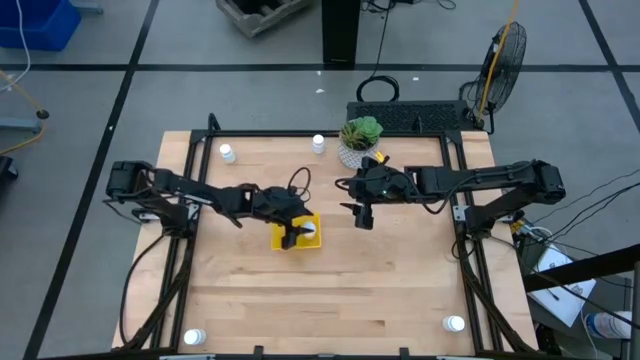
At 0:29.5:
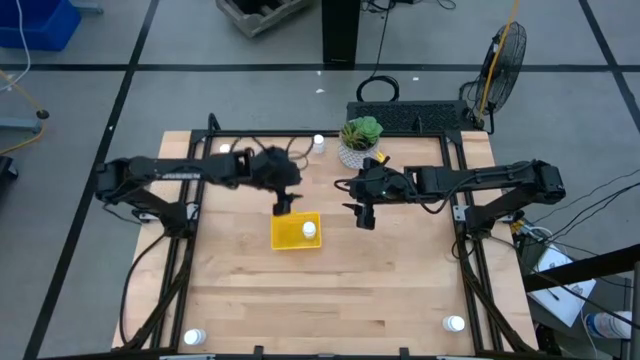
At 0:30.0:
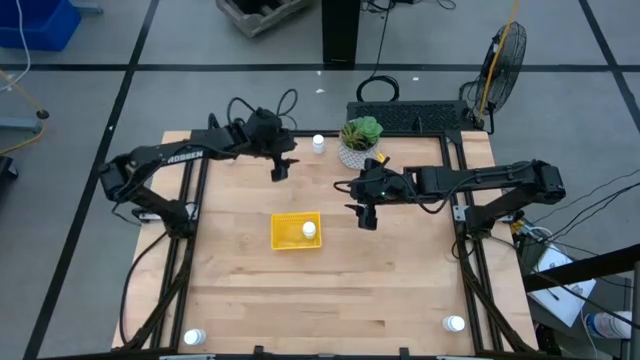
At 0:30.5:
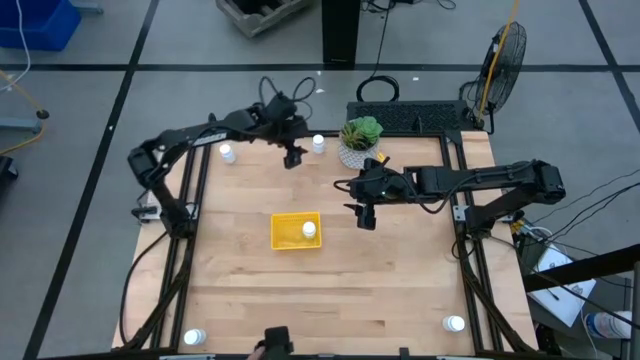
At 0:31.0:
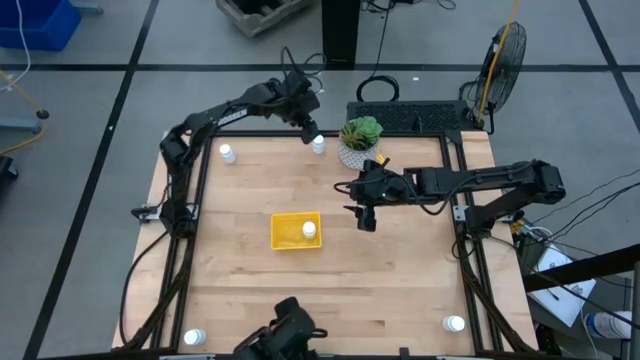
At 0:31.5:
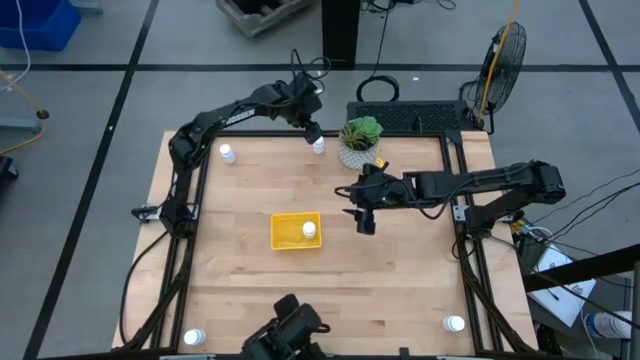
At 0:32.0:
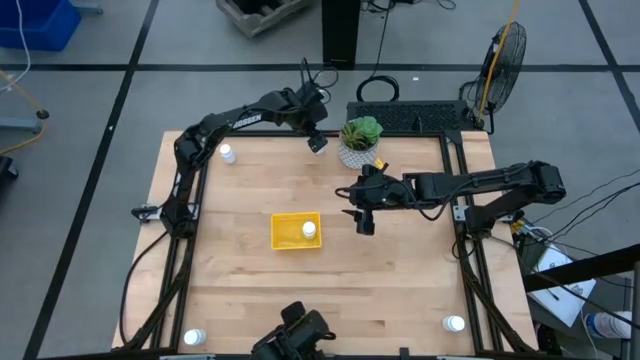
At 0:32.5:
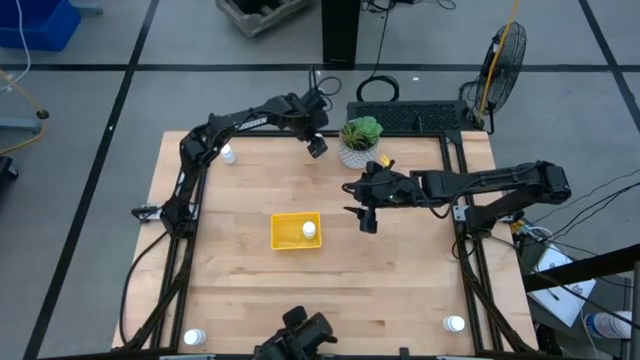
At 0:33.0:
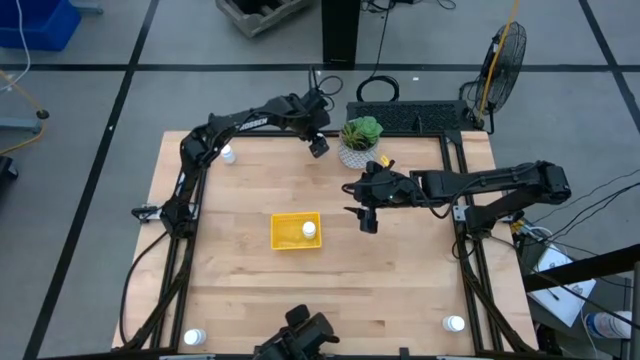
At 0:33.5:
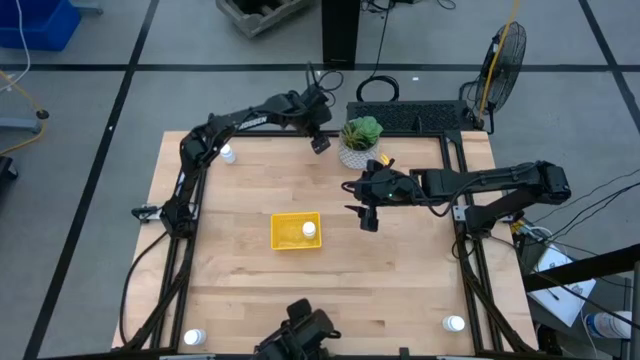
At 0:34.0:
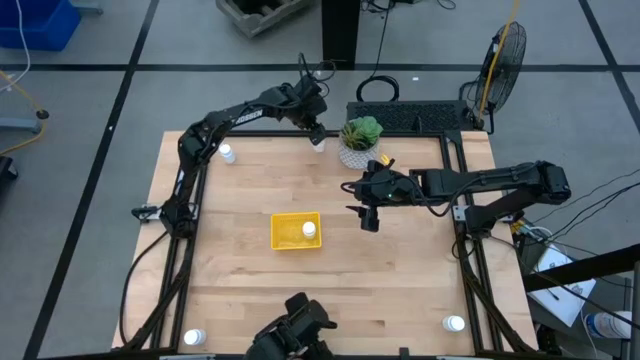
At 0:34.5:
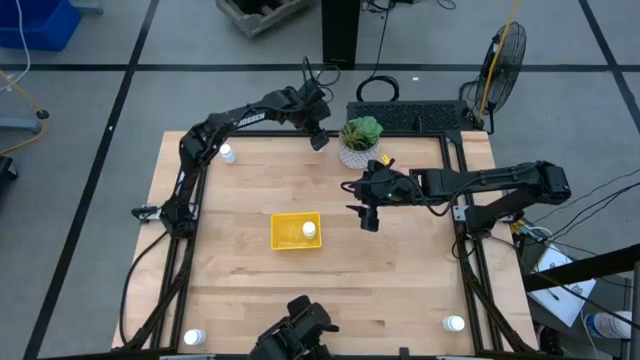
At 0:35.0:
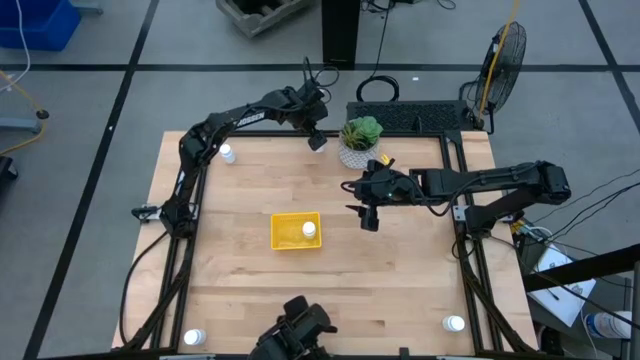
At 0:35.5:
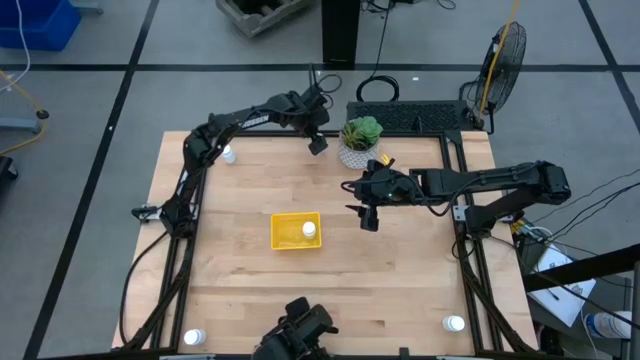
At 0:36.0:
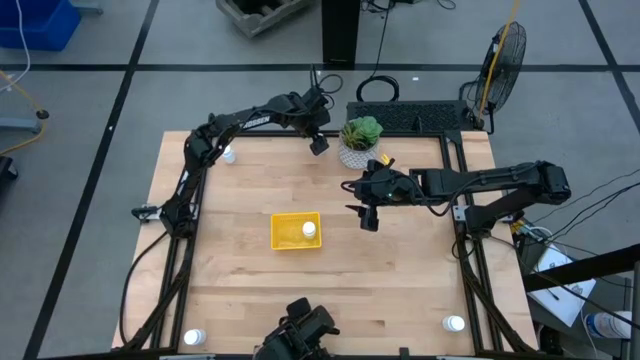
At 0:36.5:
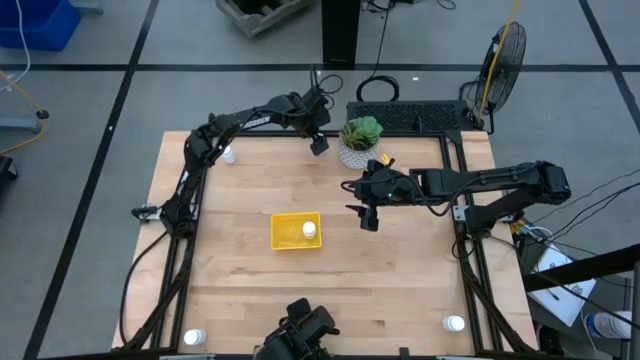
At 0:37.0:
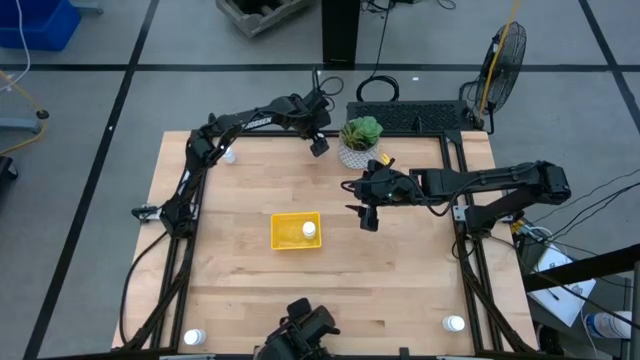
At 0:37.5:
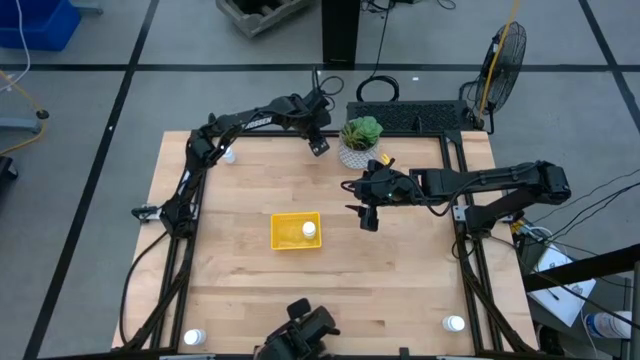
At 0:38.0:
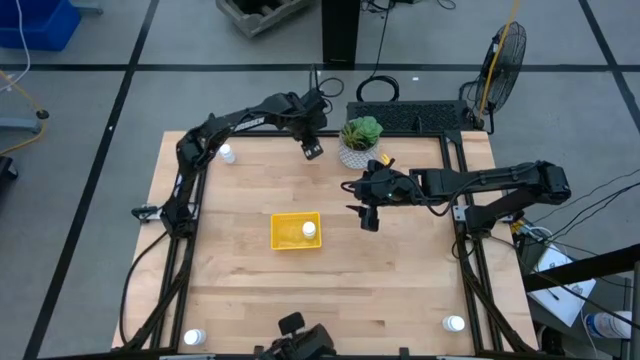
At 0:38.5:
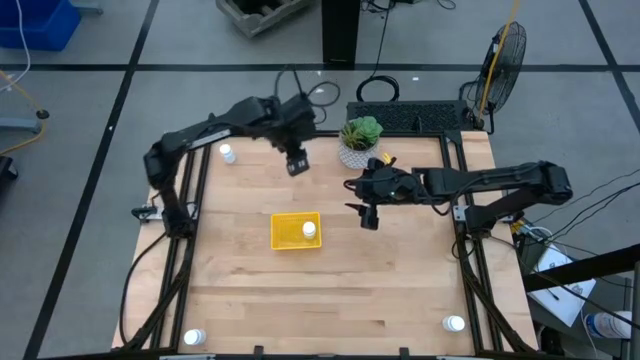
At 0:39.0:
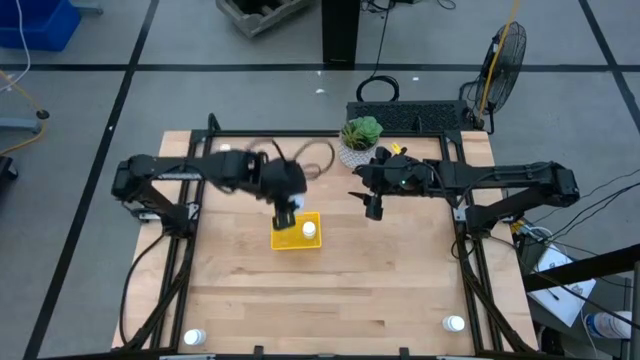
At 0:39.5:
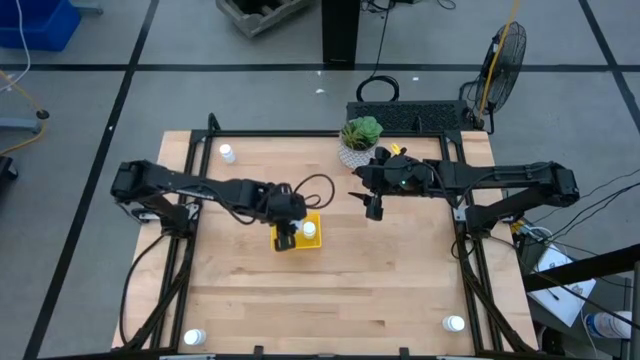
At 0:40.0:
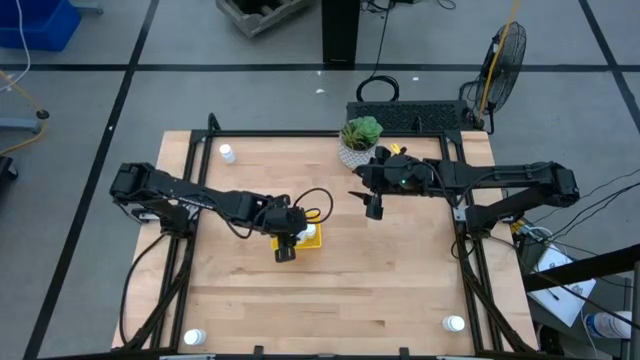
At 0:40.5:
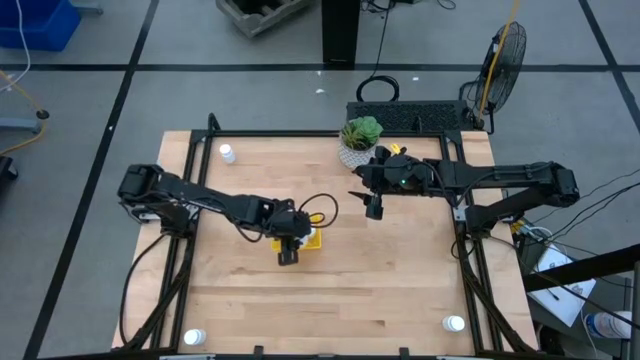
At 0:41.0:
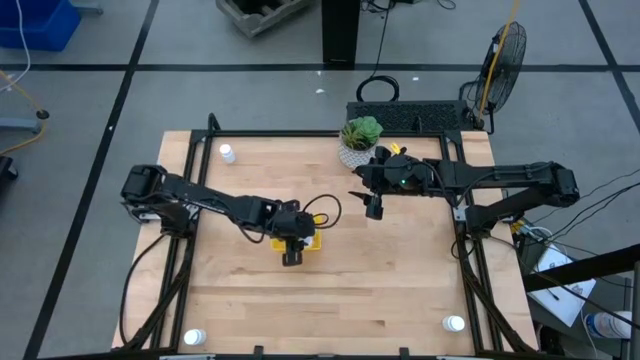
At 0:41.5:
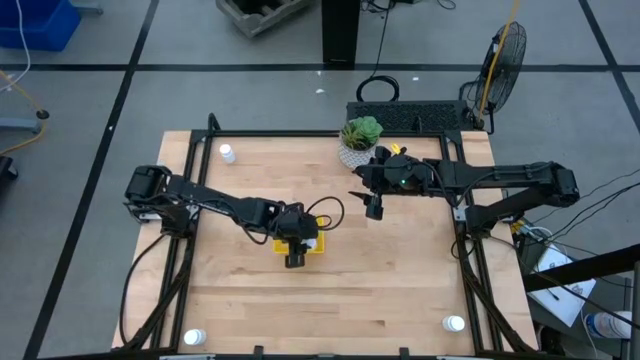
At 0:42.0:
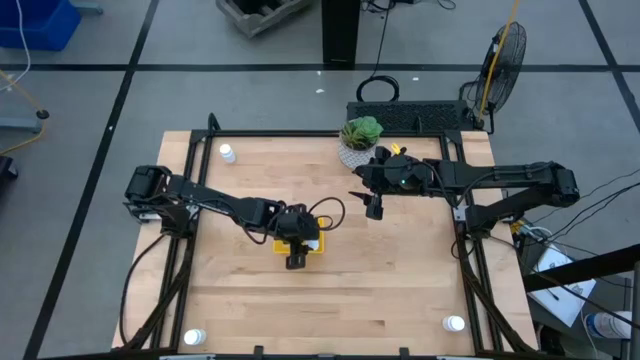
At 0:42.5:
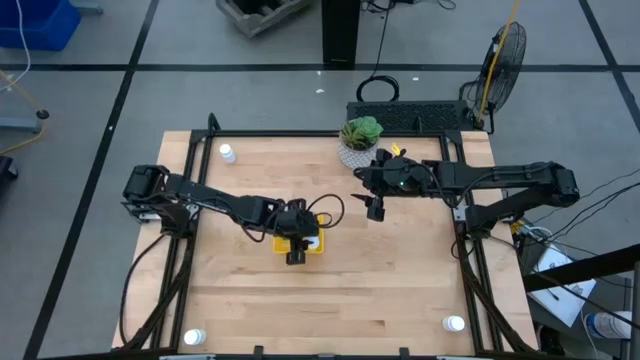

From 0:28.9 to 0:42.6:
Task: Pick and place pill bottles into a basket
Put the white pill bottle into the yellow bin

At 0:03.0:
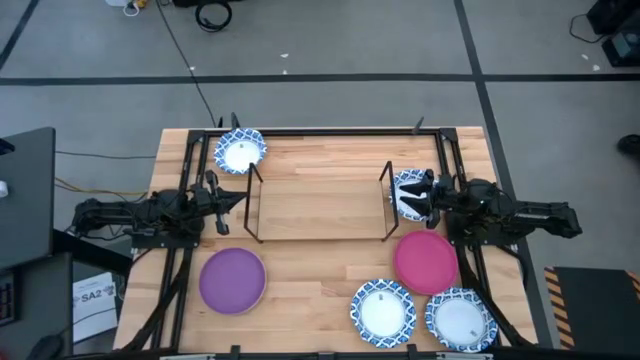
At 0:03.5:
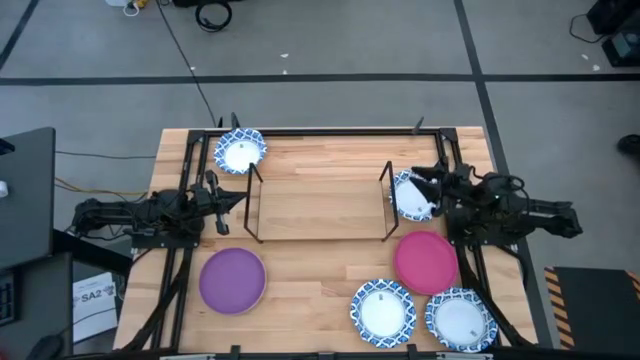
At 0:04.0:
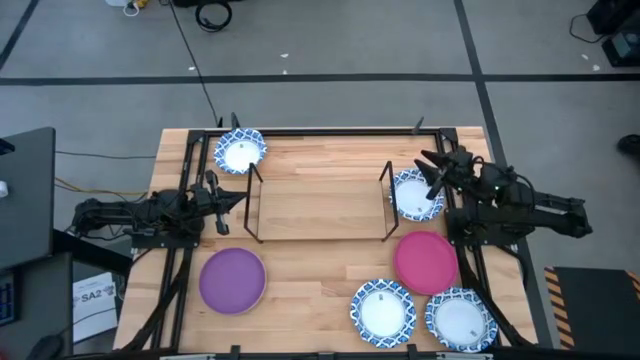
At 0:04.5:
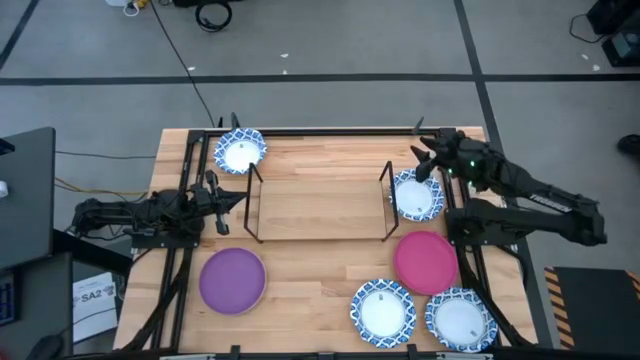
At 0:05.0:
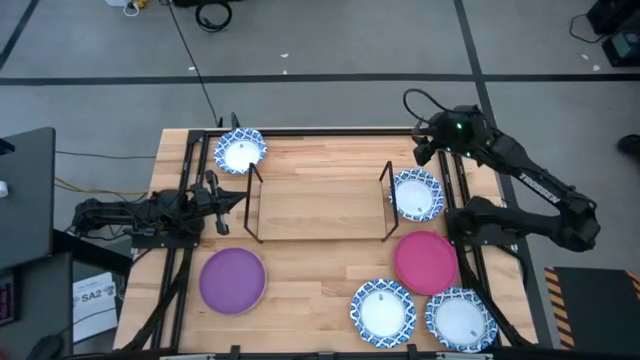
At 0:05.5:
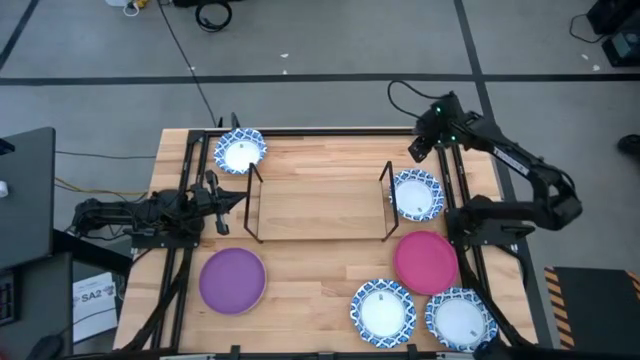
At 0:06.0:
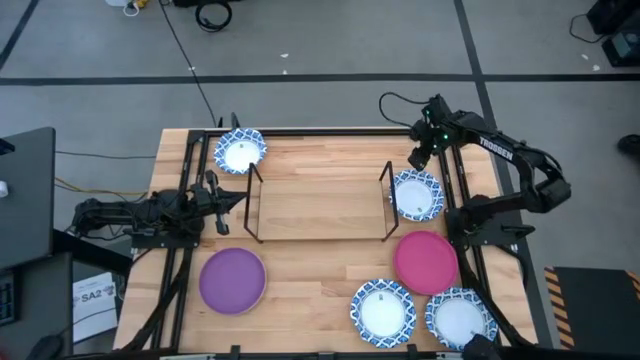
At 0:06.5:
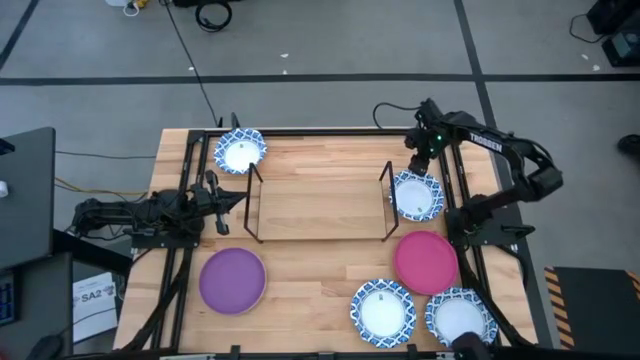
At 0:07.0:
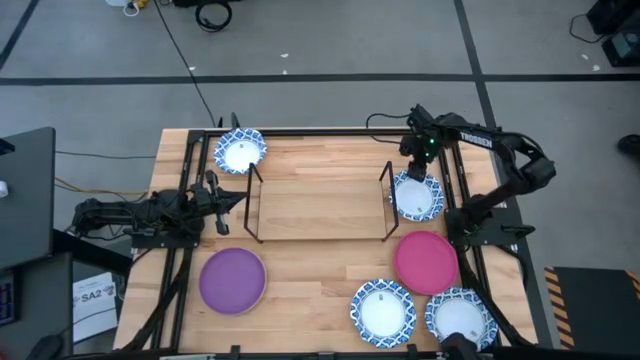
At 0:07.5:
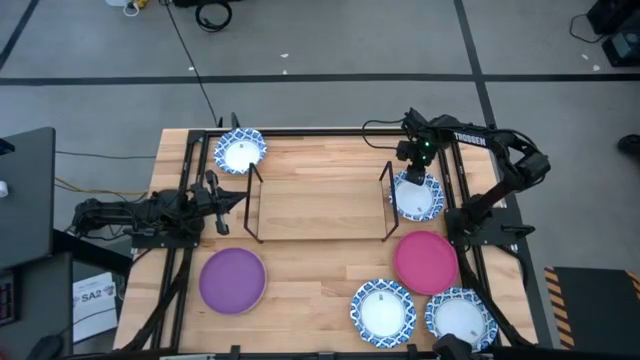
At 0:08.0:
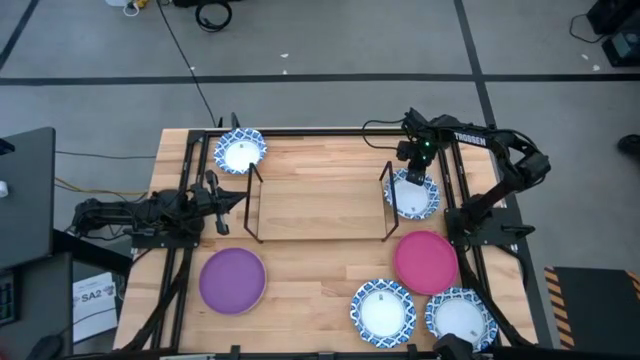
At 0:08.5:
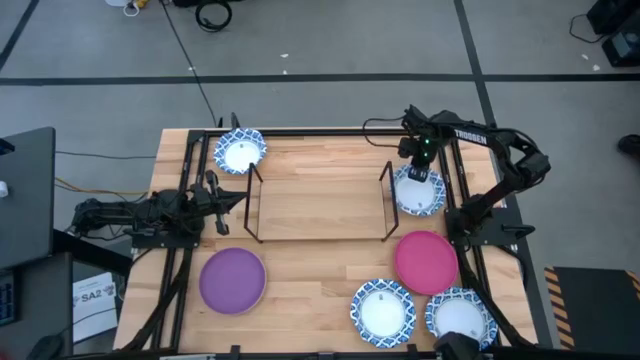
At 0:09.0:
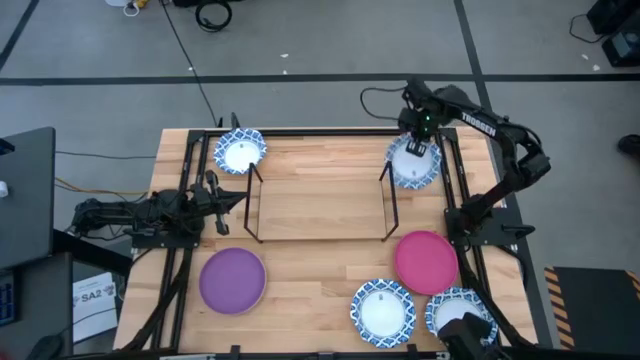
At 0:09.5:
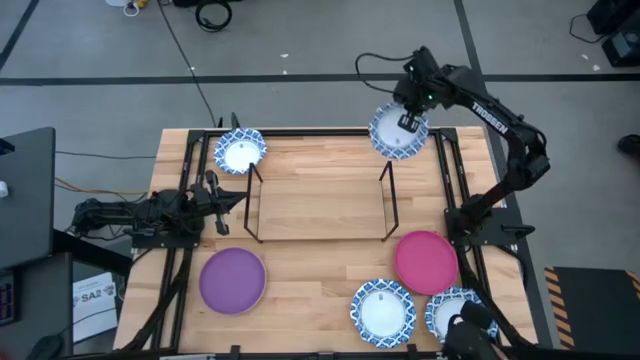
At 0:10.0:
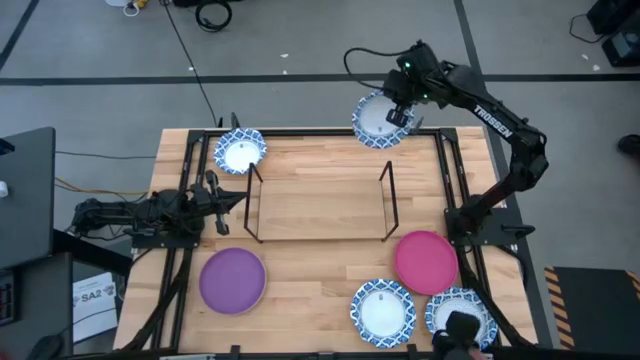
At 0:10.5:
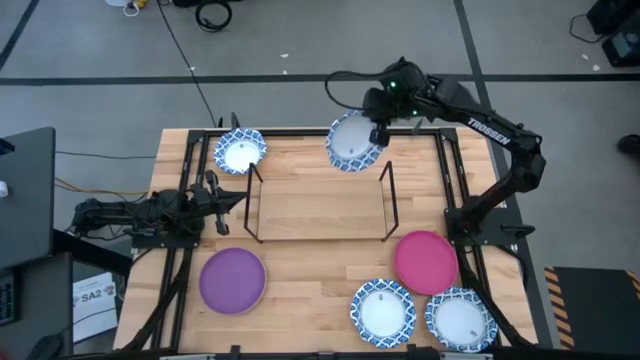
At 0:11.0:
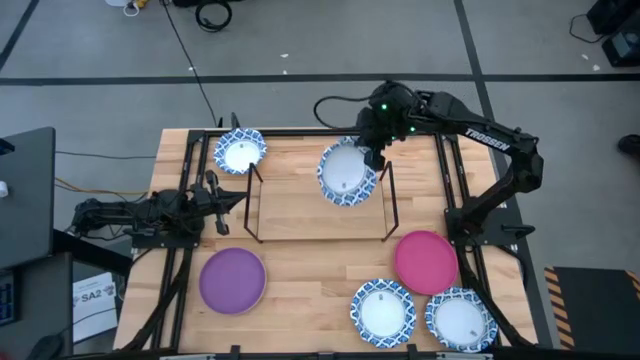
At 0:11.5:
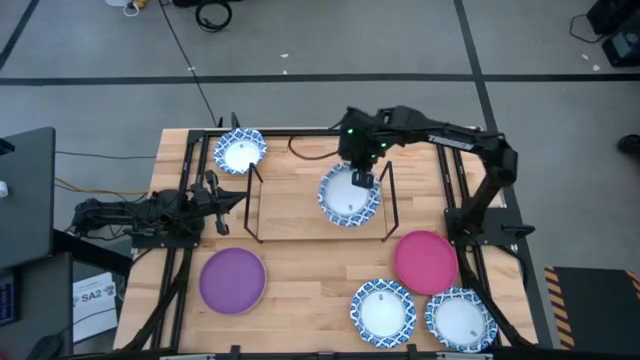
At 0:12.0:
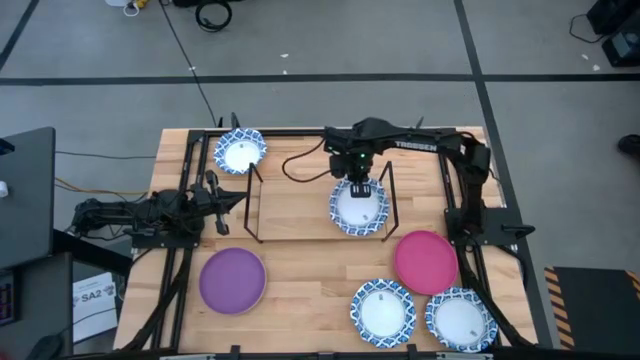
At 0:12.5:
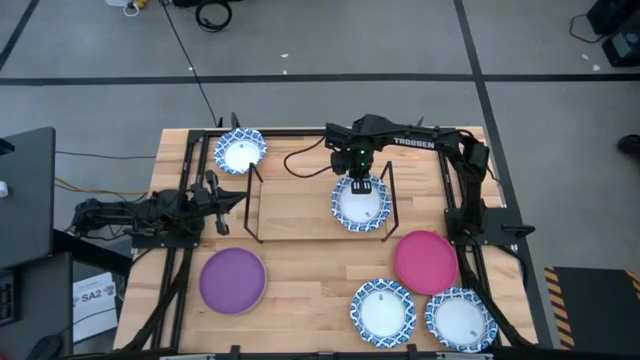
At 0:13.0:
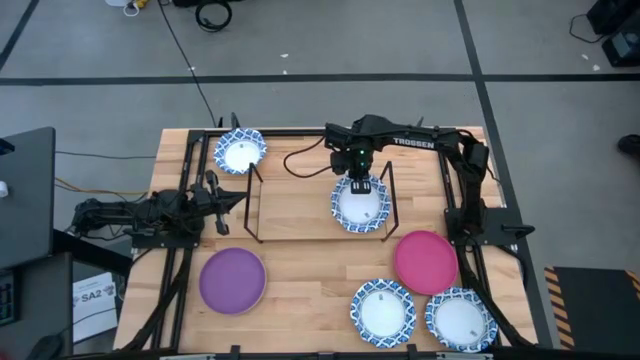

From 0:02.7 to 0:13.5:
Task: Place and stack plates onto a shelf
Put the white-blue patterned bowl on the shelf
